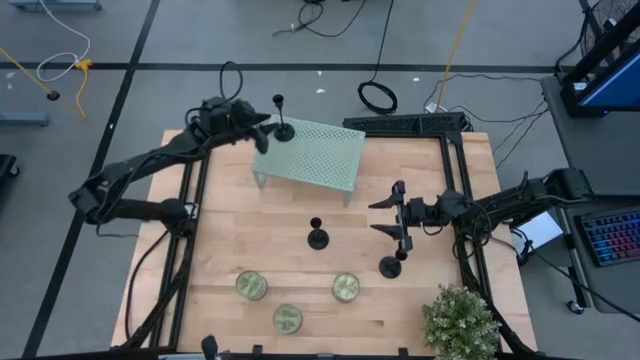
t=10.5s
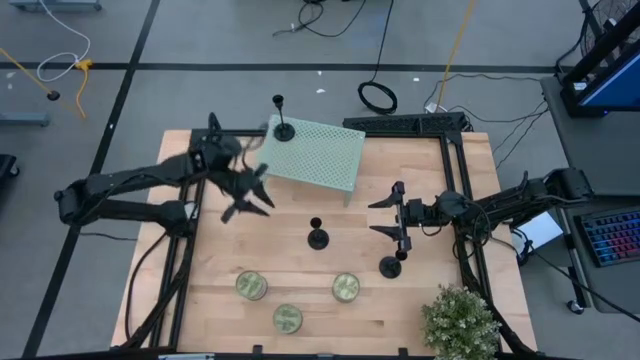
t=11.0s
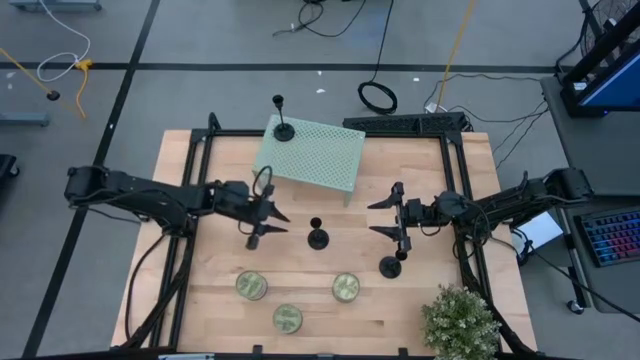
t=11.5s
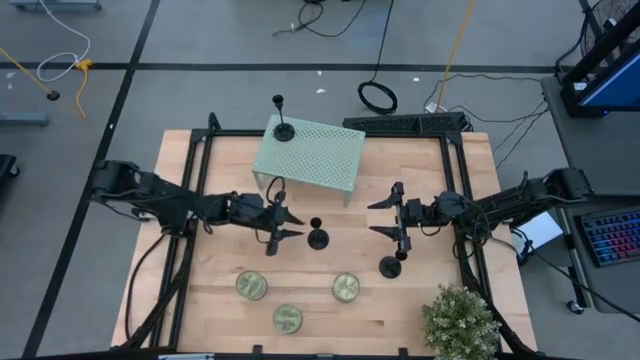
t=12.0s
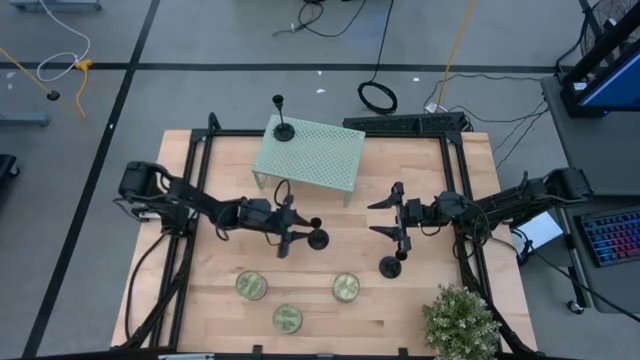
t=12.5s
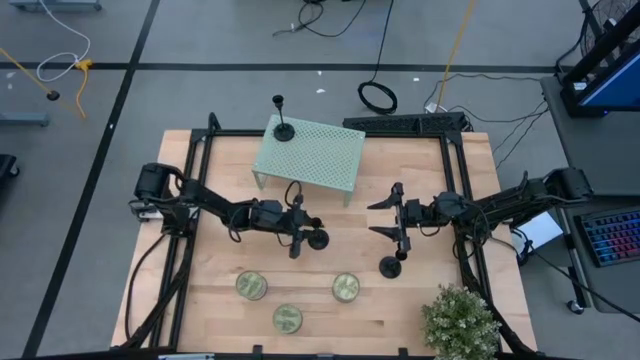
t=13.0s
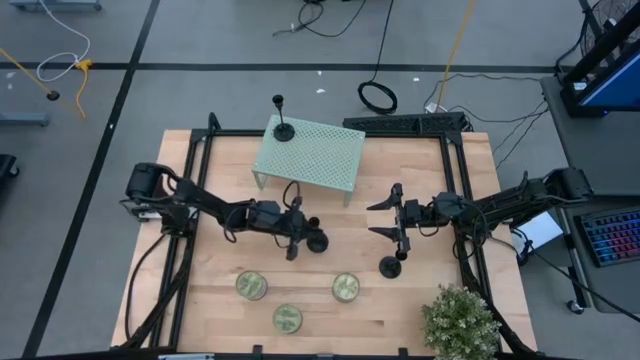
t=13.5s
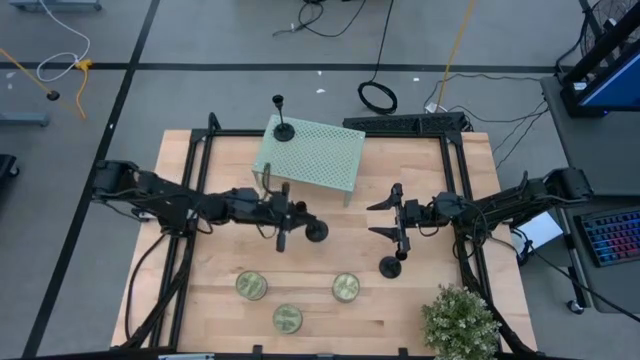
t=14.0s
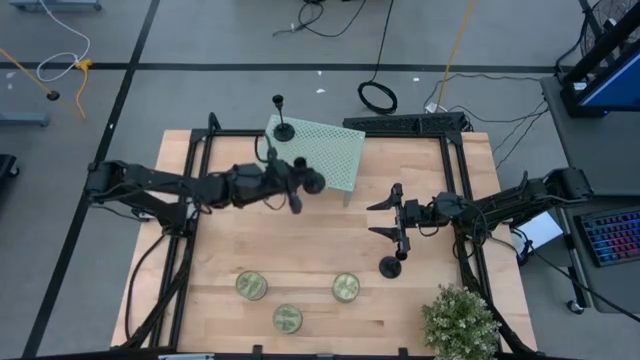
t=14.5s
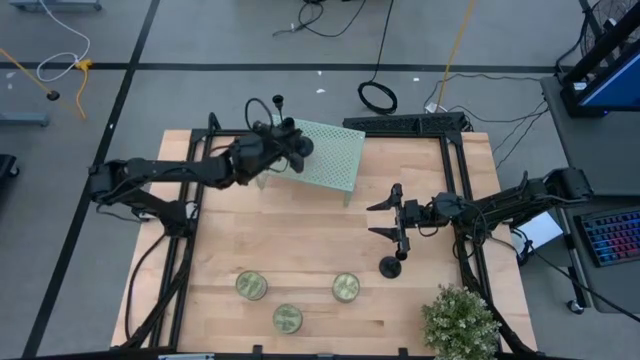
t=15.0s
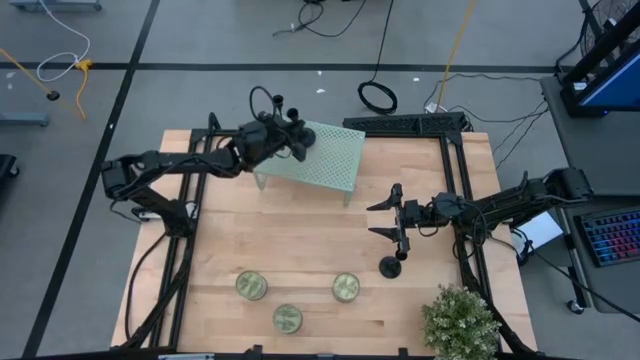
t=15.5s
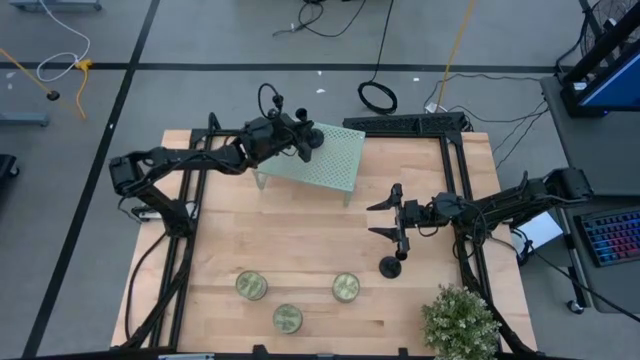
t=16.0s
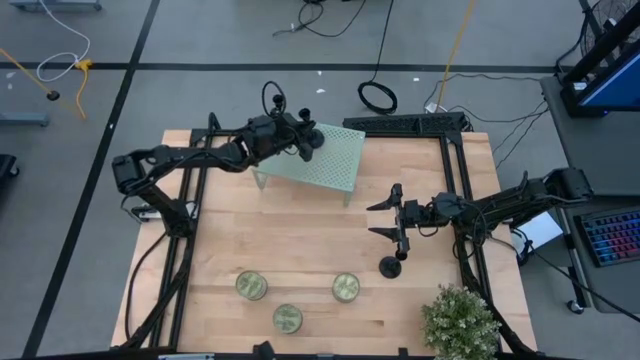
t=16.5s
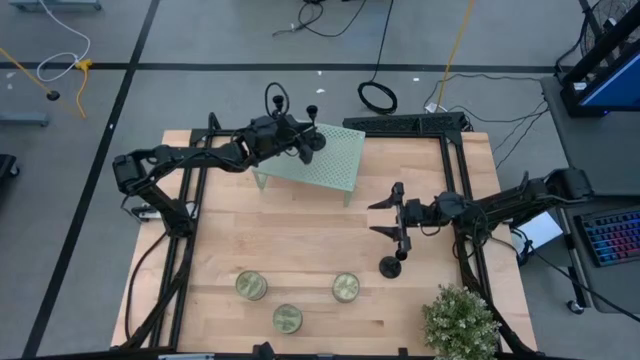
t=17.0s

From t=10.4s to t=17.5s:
Task: Pick & Place candle stick holders
Put the top black candle holder on the shelf aligned with the other black candle holder

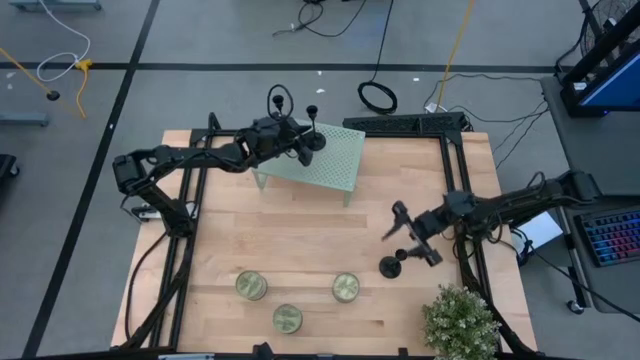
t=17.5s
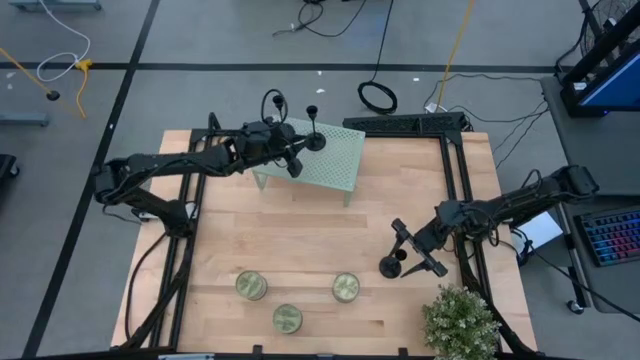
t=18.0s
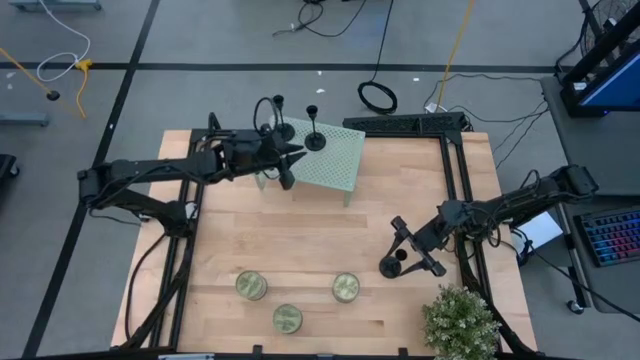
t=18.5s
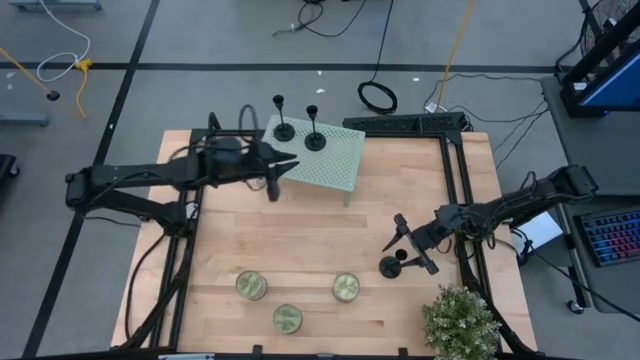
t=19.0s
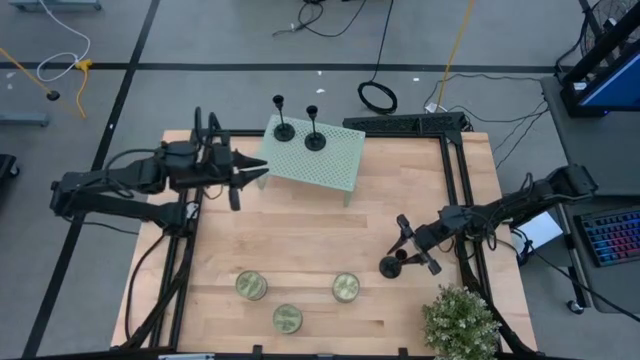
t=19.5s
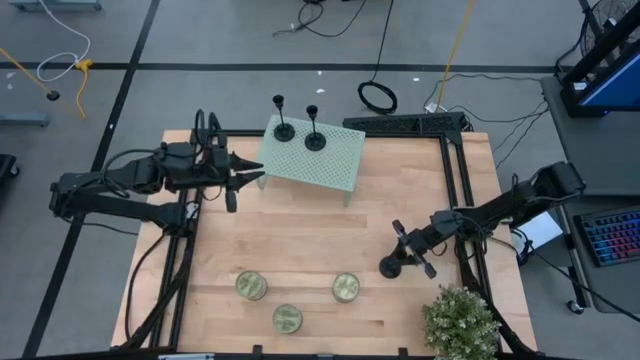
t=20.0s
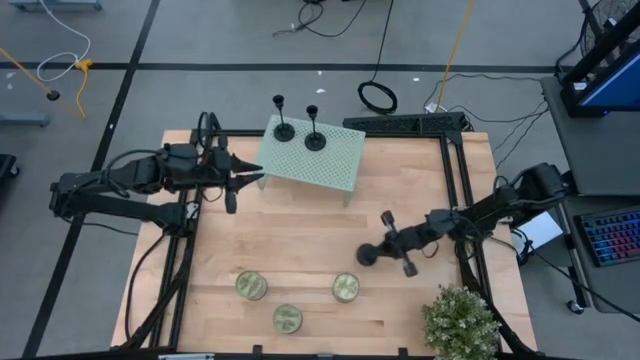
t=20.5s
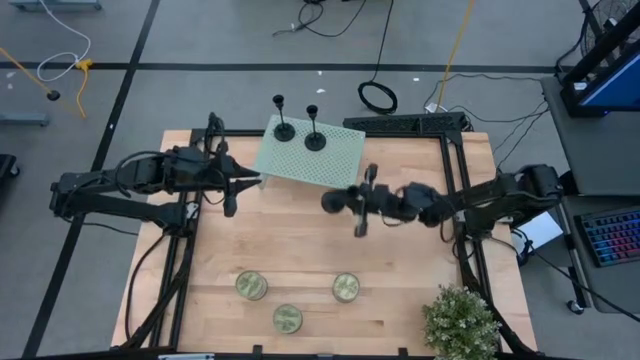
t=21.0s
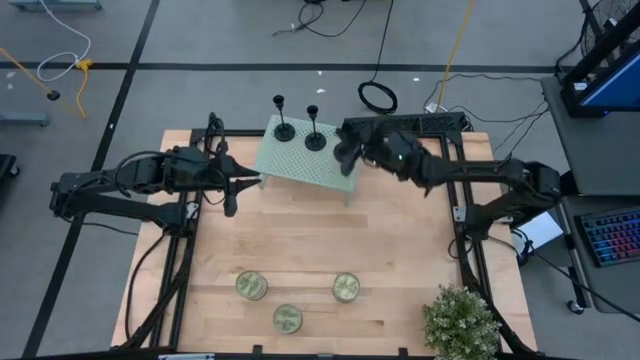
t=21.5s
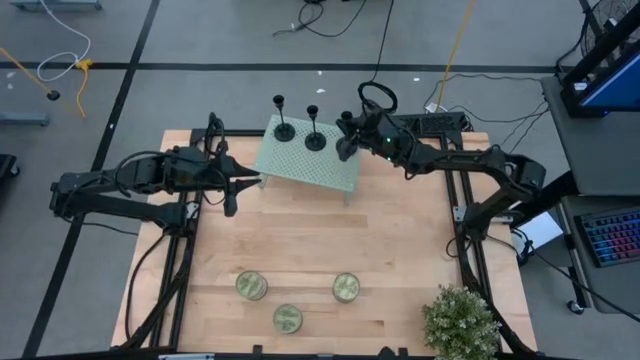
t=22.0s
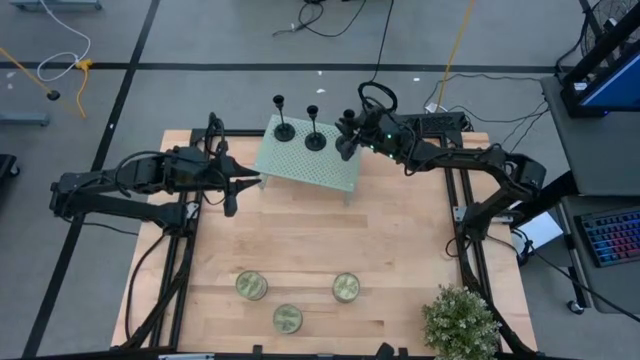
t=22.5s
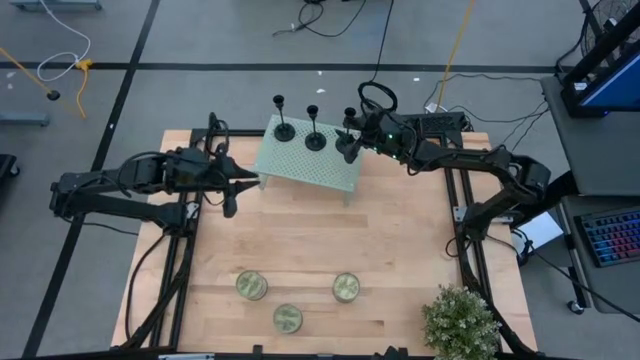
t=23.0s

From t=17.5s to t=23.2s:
Put the black candle holder on the shelf aligned with the other black candle holder

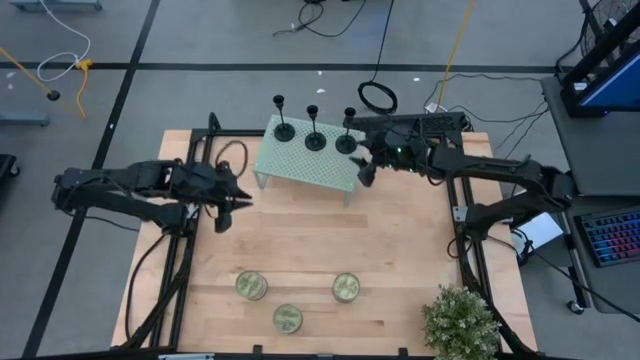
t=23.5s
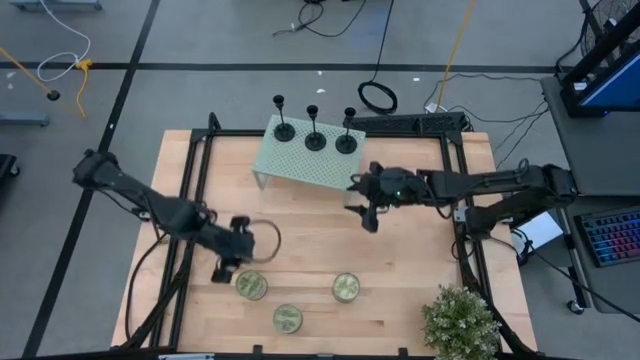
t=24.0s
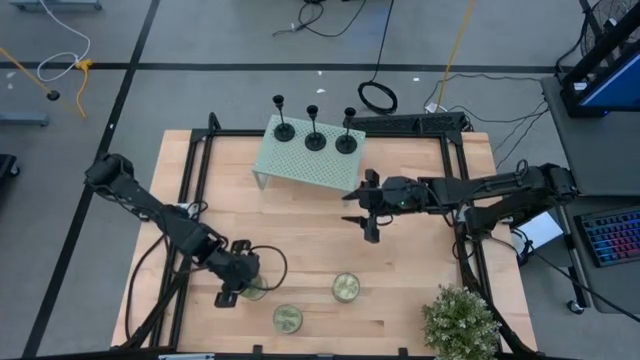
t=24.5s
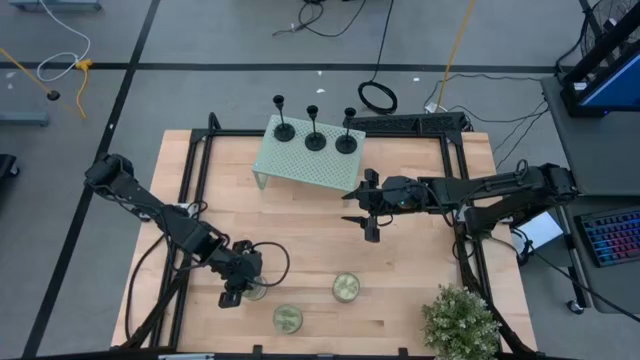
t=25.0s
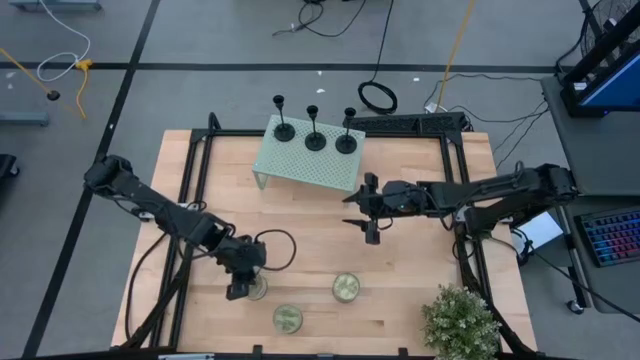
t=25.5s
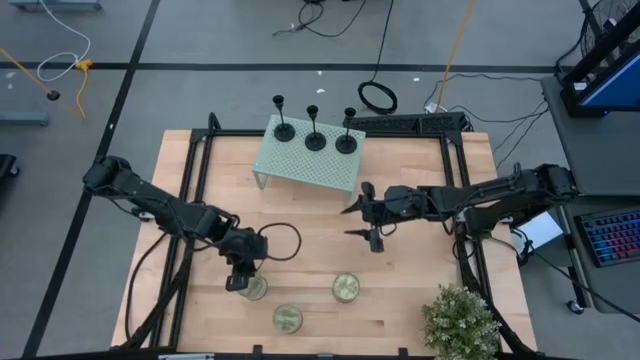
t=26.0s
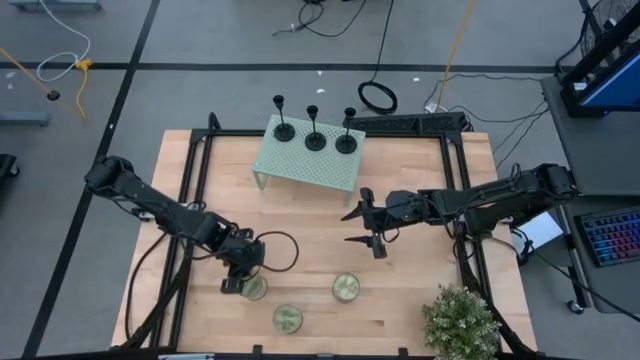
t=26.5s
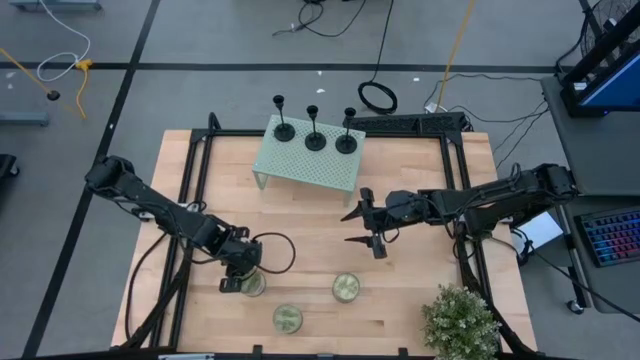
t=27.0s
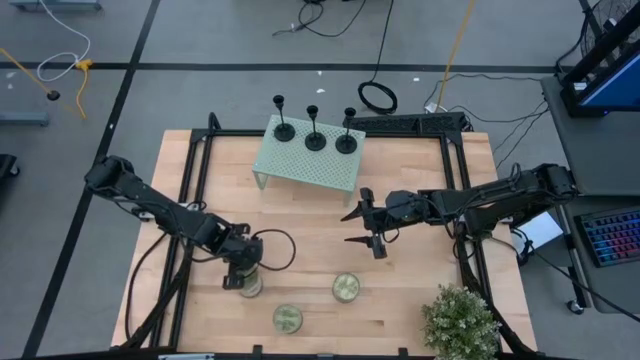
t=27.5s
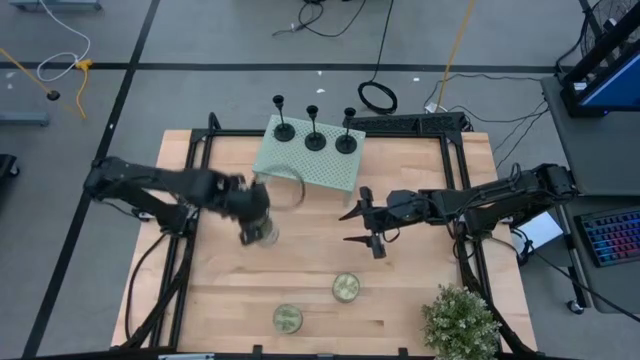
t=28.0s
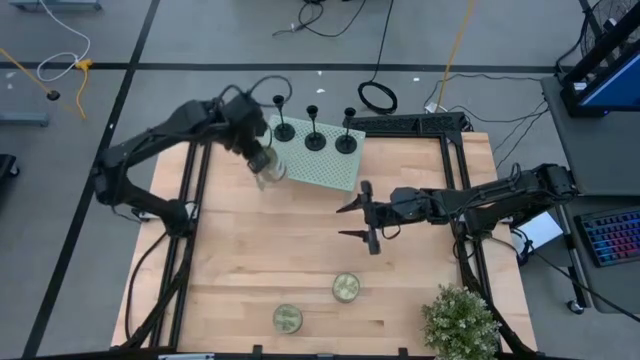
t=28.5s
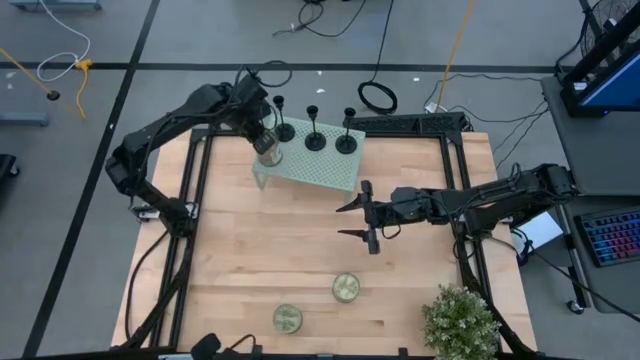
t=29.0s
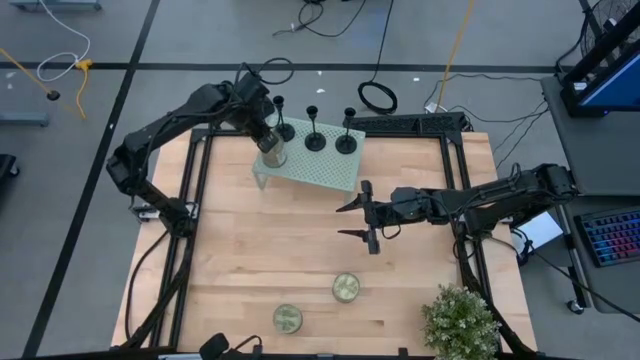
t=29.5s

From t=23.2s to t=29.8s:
Put the top left silver scented candle on the shelf

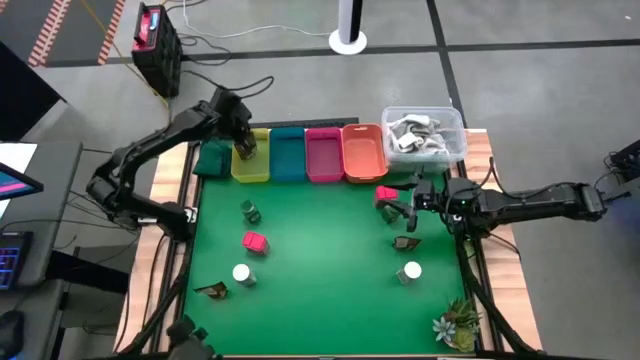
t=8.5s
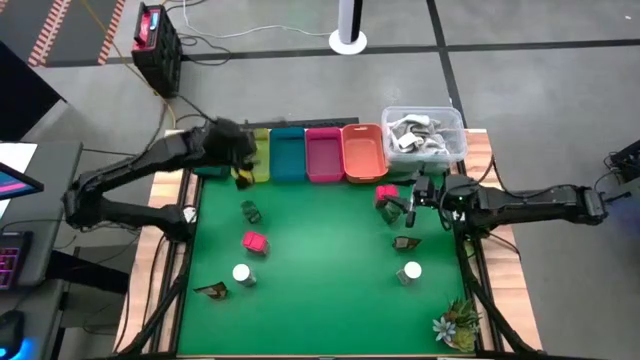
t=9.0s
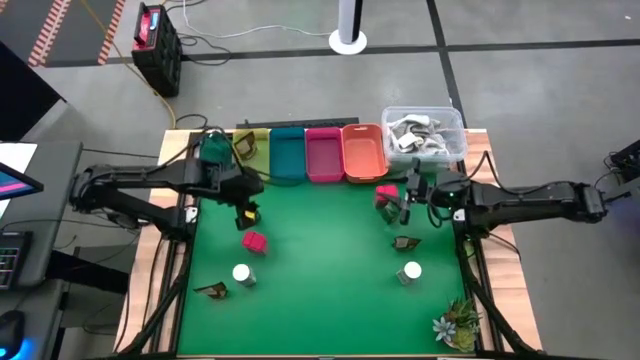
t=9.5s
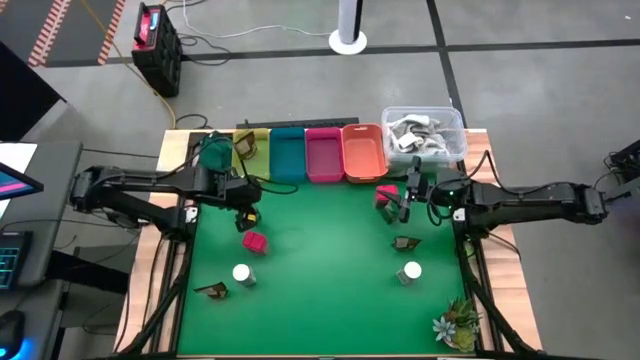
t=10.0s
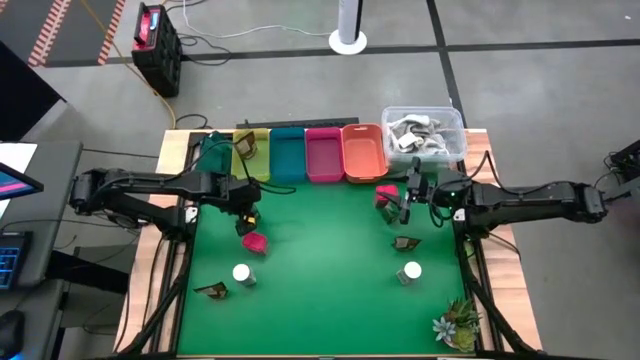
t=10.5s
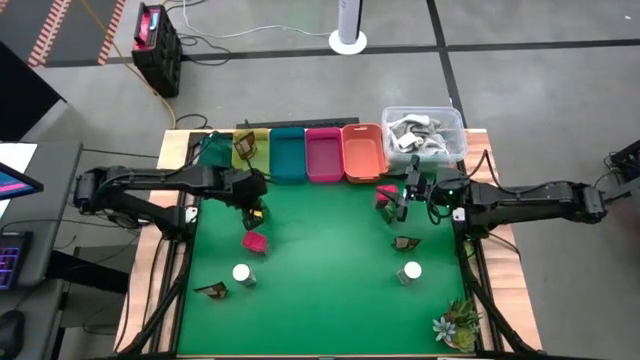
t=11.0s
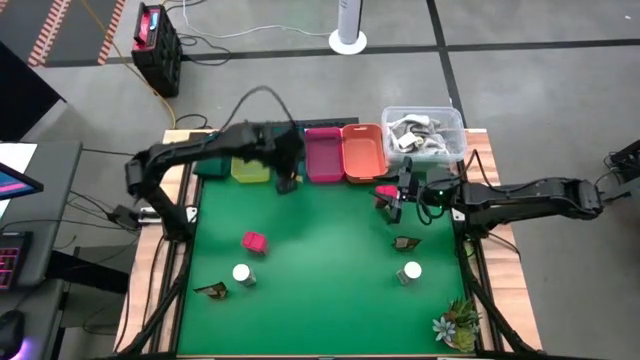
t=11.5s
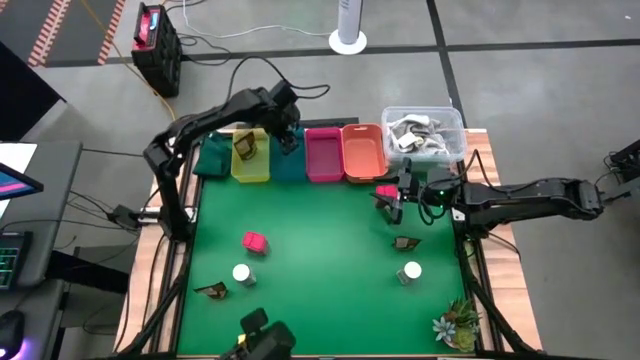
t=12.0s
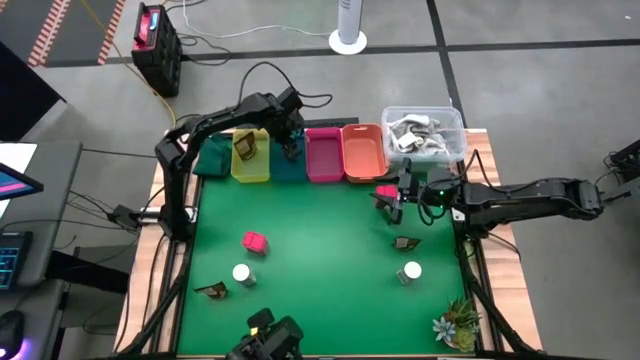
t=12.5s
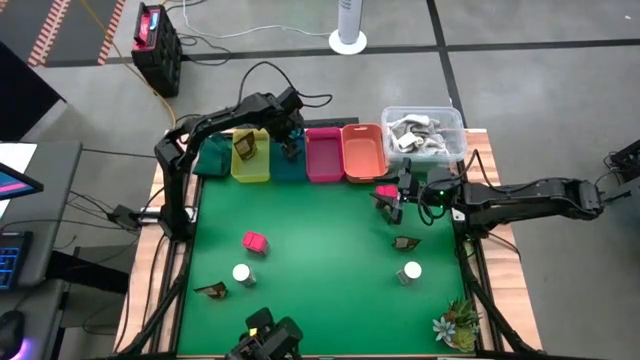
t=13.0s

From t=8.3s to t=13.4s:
Task: Sort spices by type
Put the left green spice bottle into the blue bin
